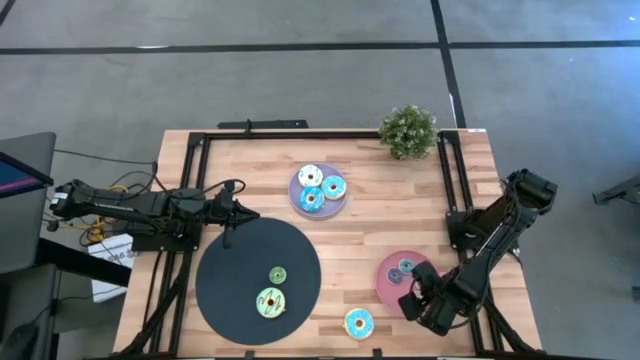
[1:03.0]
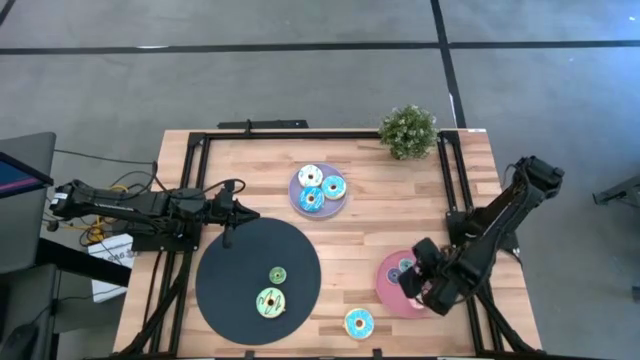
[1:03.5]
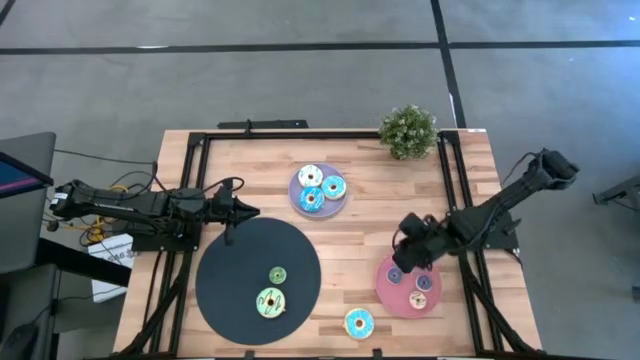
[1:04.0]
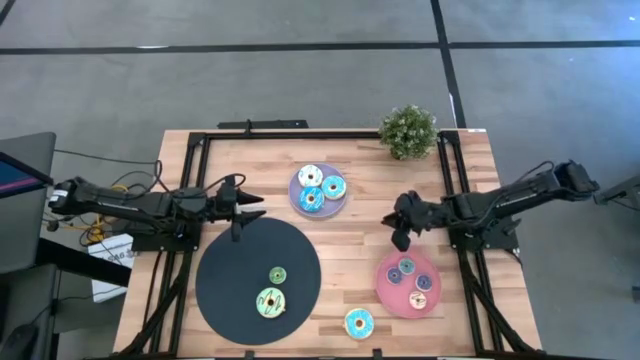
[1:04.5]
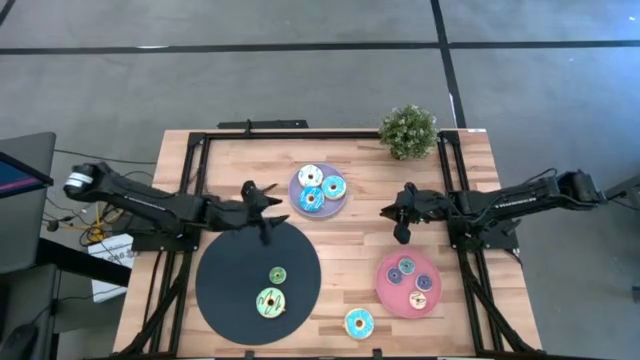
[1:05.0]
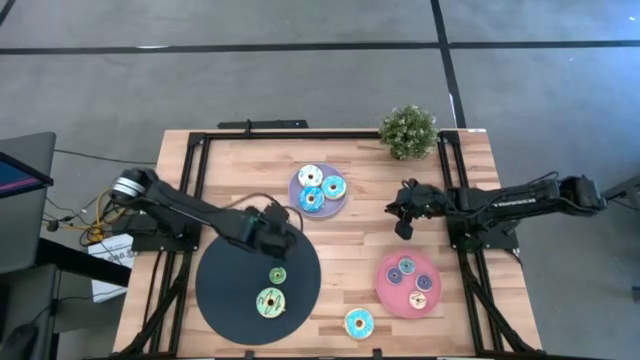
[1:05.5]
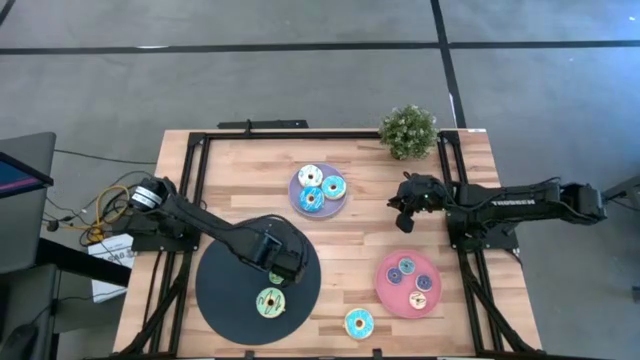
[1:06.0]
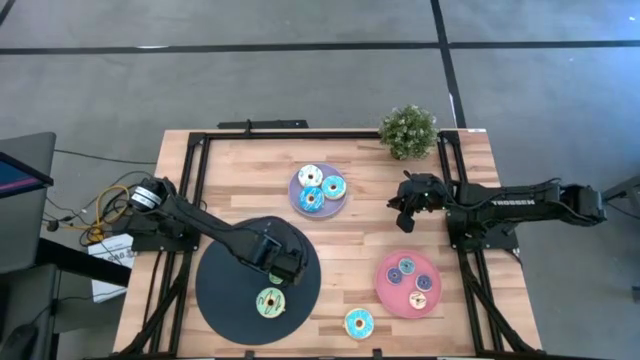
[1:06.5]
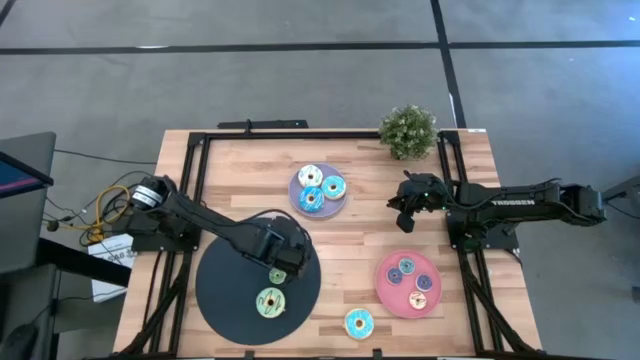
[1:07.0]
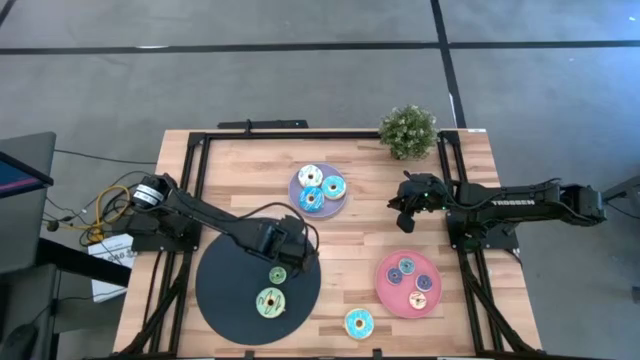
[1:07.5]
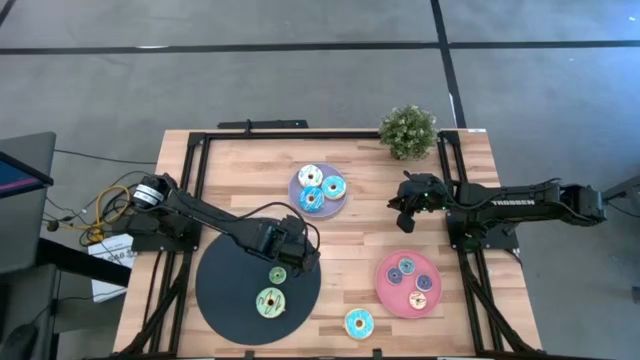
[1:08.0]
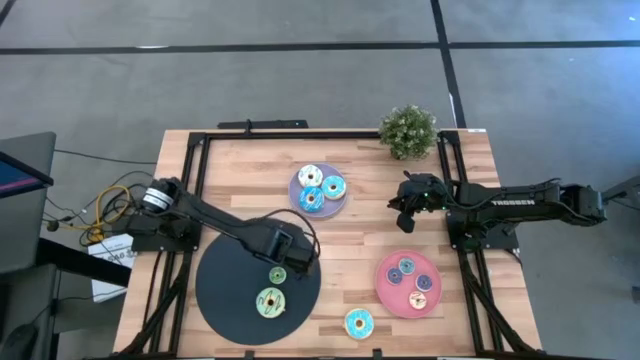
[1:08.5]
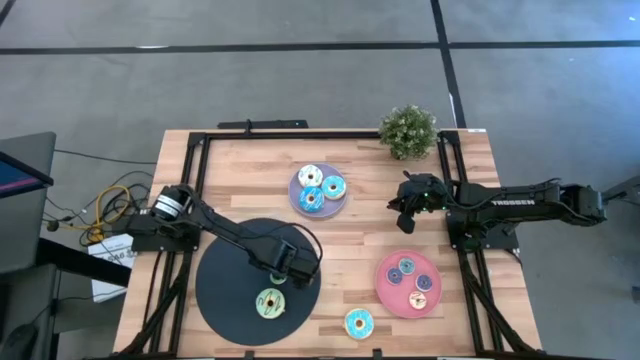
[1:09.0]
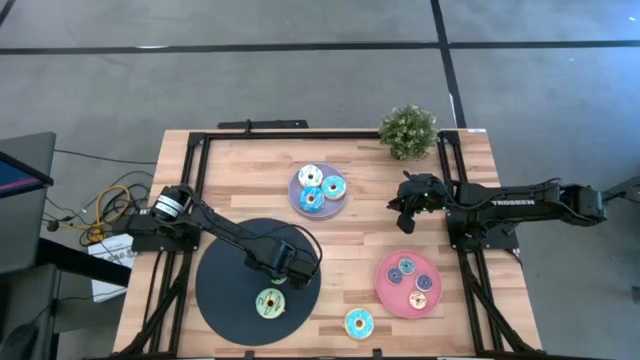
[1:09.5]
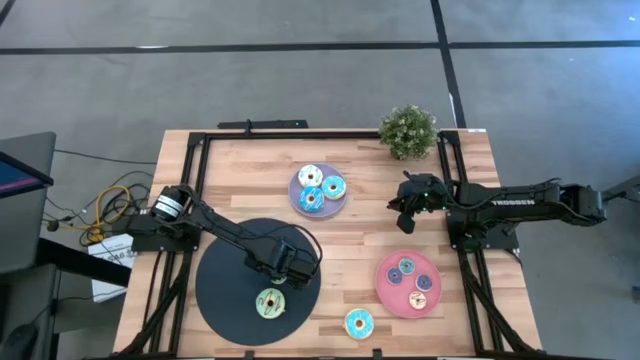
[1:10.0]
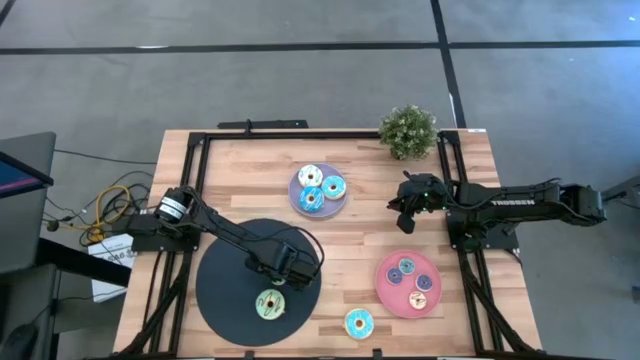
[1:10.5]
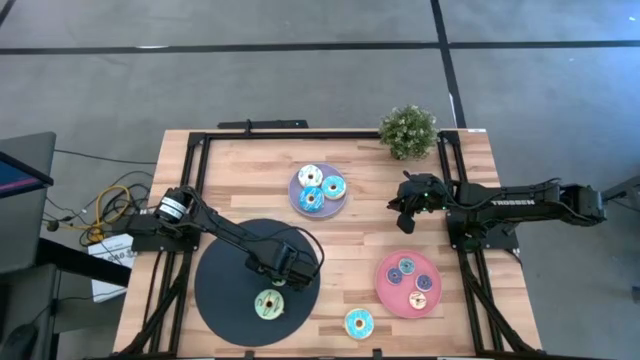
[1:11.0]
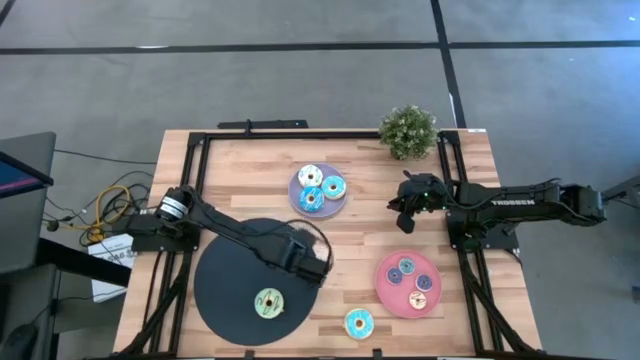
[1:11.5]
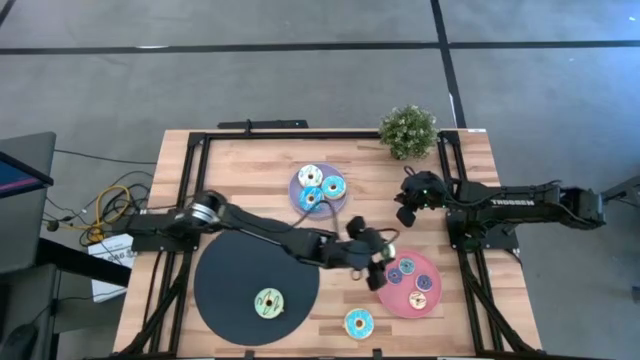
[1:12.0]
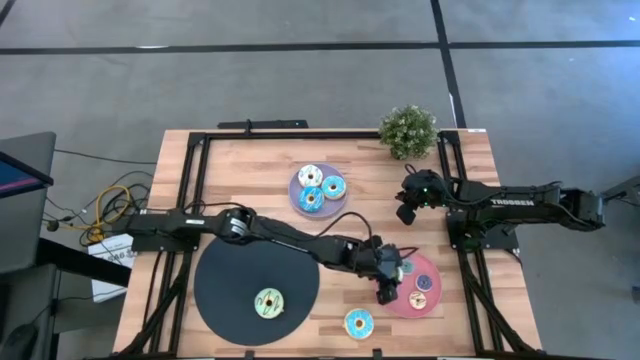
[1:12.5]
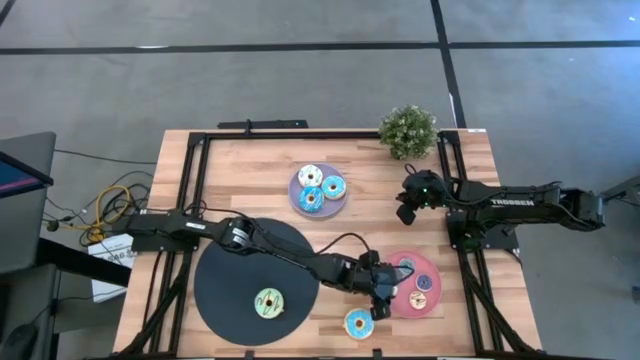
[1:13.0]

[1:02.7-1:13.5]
Task: Pick & Place donuts
Put the small green donut on the pink plate

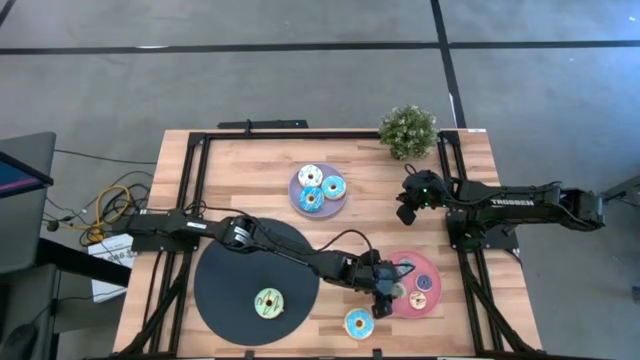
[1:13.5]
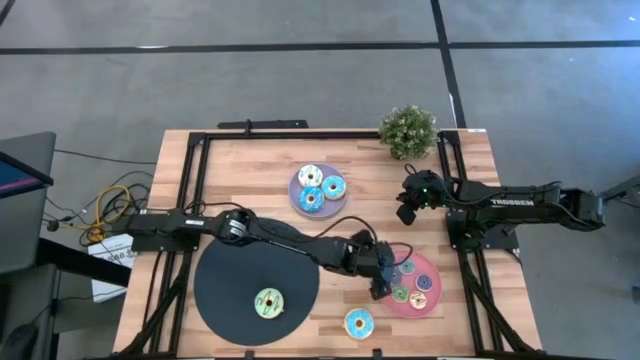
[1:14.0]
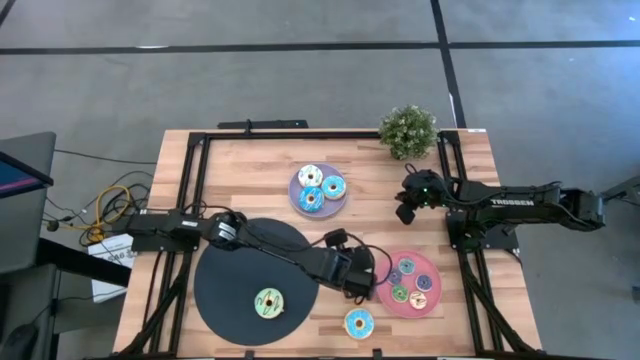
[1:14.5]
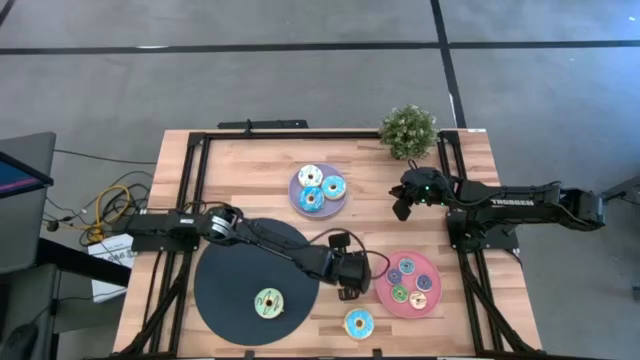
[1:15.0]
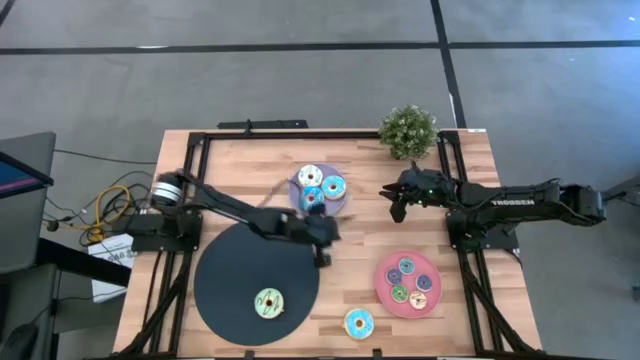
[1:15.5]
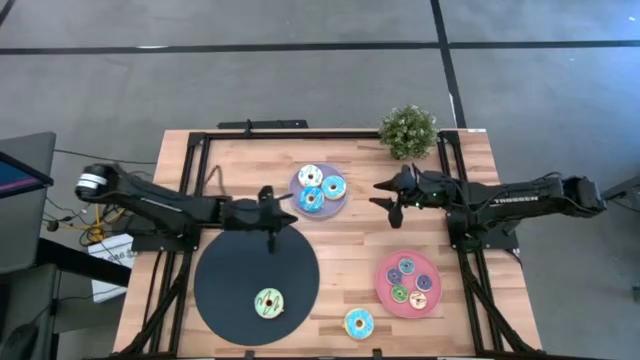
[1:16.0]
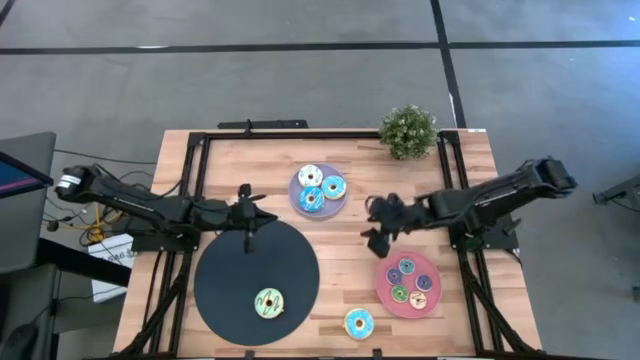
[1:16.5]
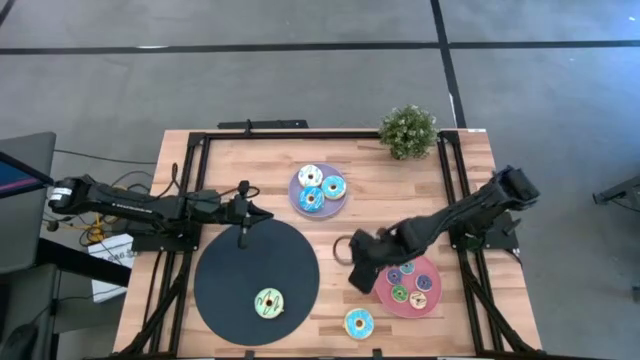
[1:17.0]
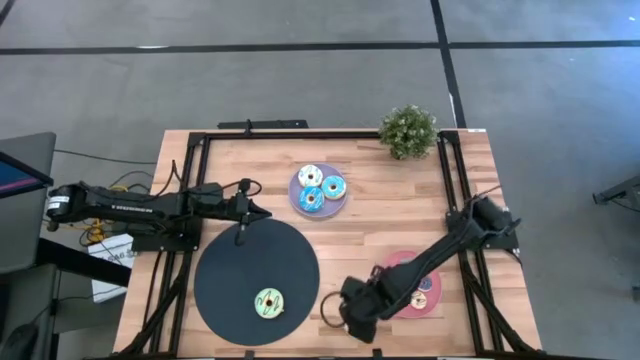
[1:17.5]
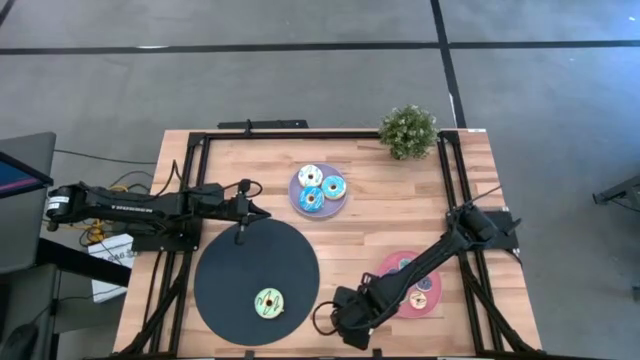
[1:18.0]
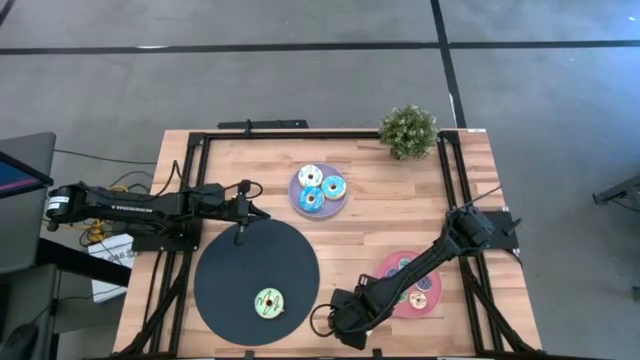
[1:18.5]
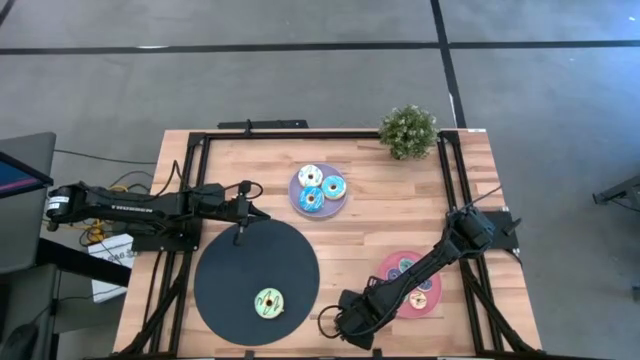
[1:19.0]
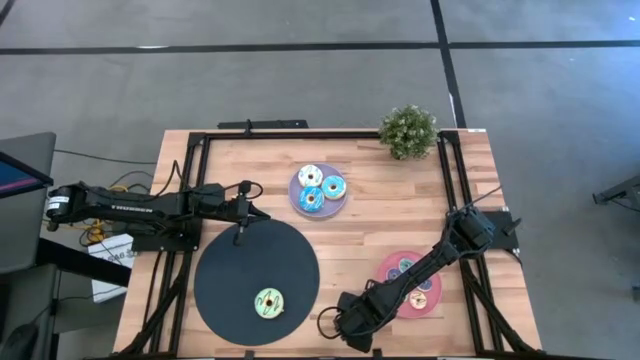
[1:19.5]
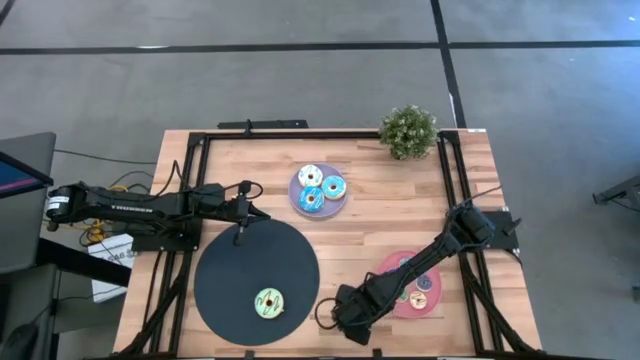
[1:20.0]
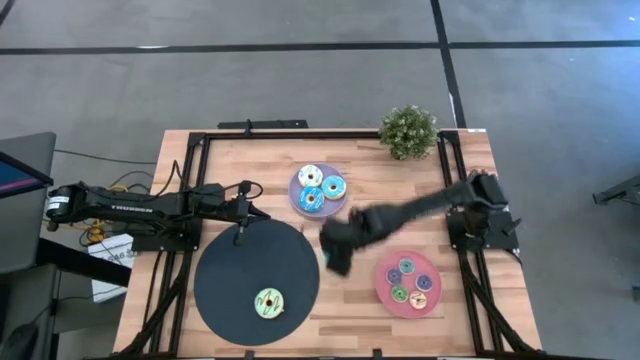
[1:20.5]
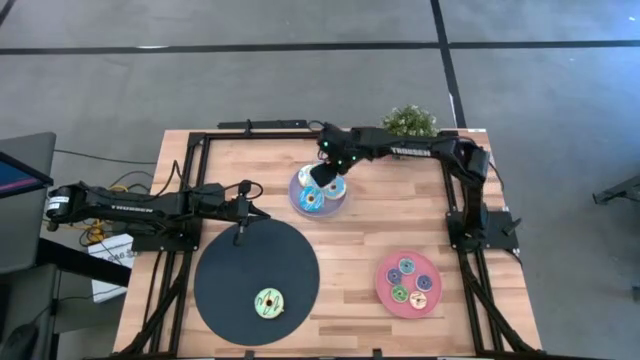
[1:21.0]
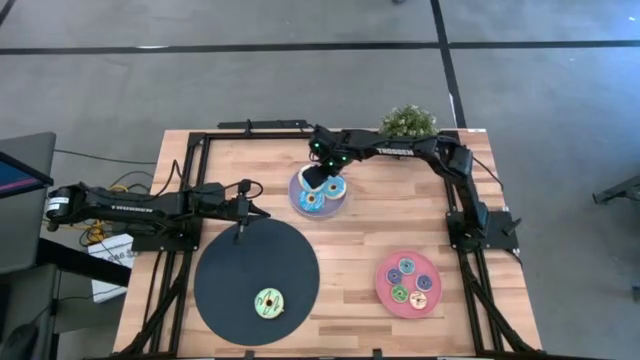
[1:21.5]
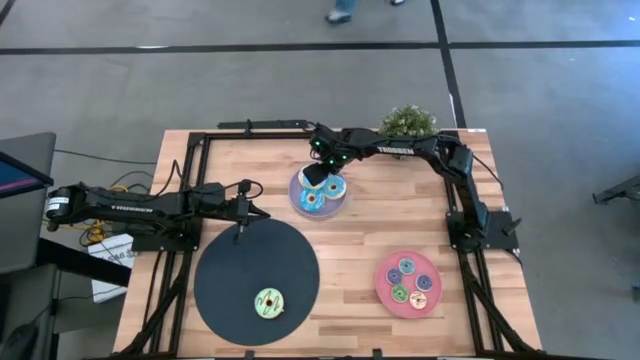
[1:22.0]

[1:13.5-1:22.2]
Put the large light blue donut on the purple plate

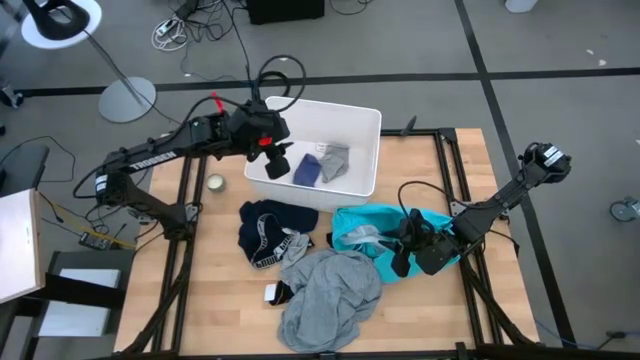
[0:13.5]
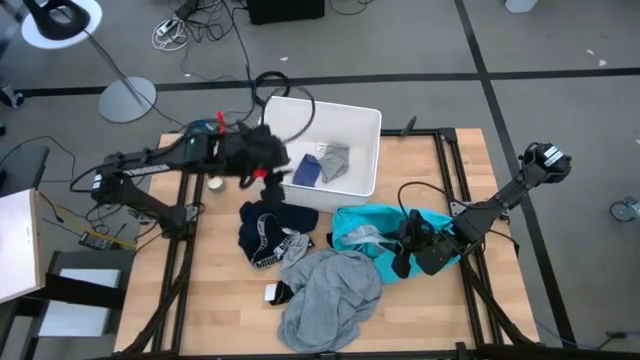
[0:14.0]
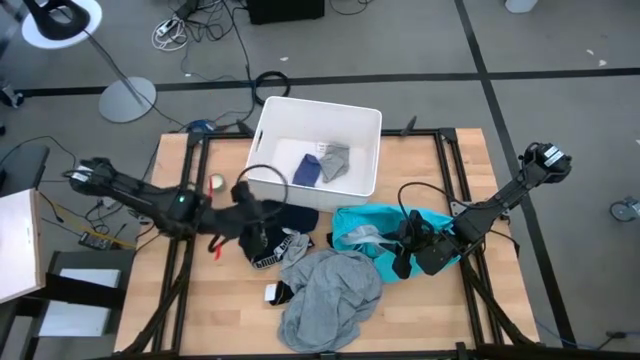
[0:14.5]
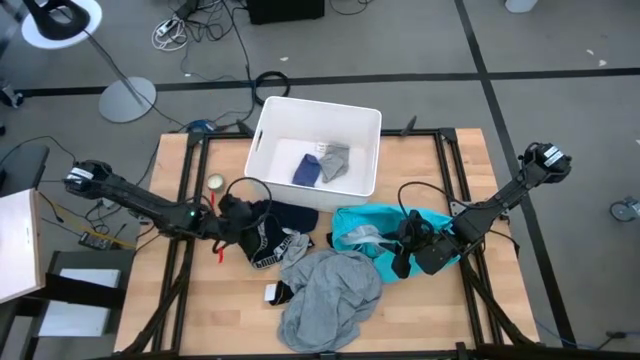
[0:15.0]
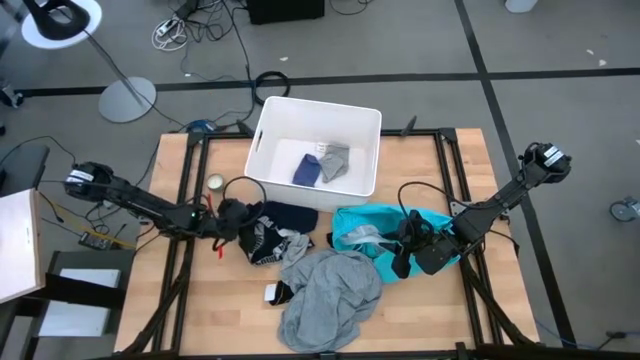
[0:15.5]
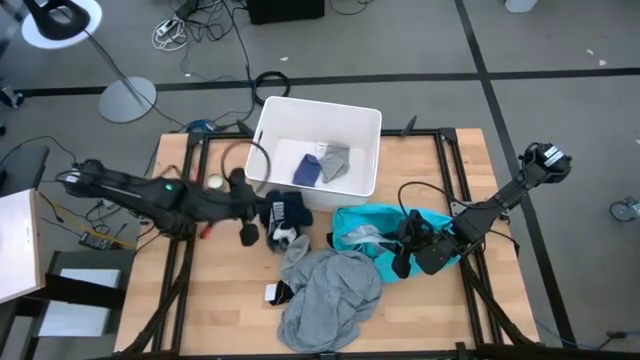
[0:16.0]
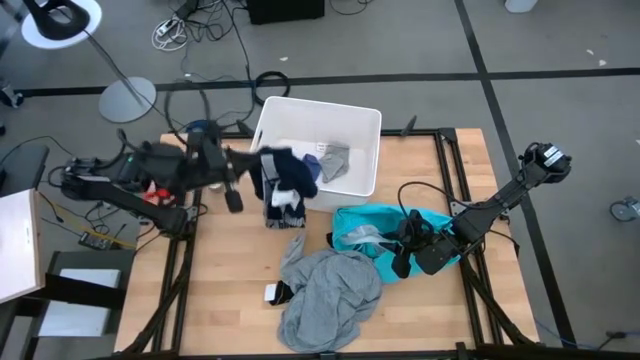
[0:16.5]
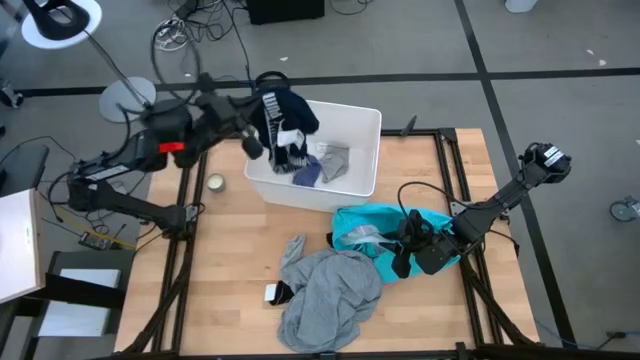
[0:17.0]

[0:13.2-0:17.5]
Task: Sort clothes
Put the dark blue underwear into the laundry bin
